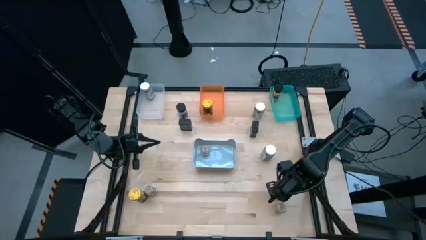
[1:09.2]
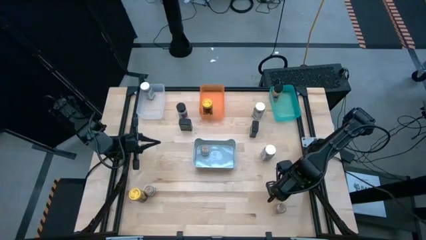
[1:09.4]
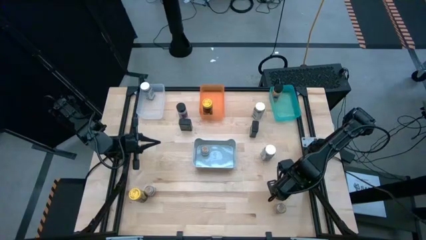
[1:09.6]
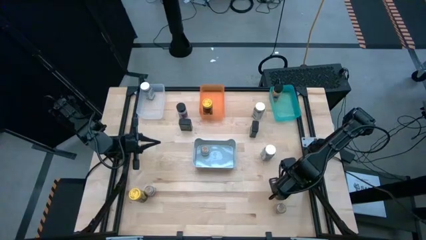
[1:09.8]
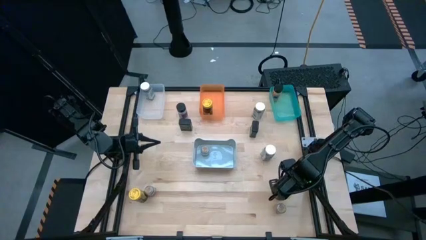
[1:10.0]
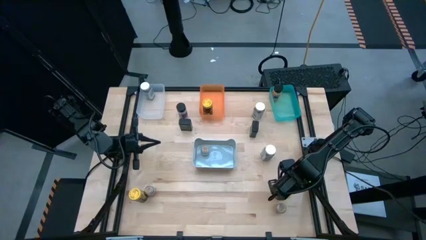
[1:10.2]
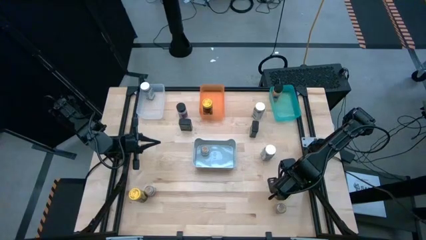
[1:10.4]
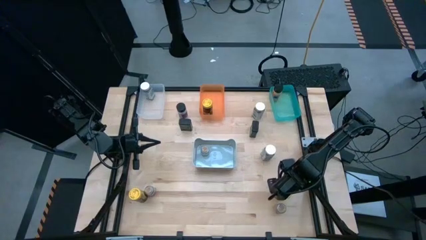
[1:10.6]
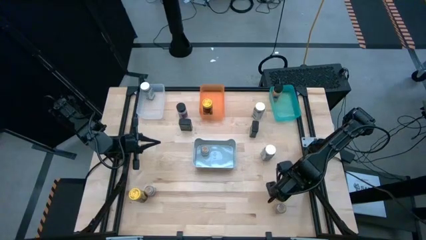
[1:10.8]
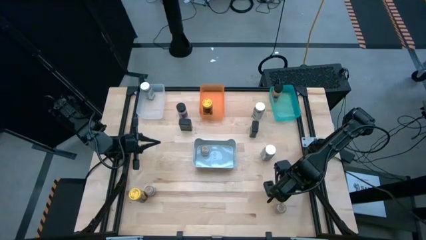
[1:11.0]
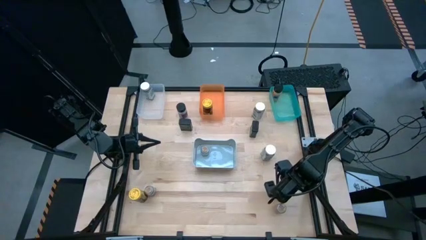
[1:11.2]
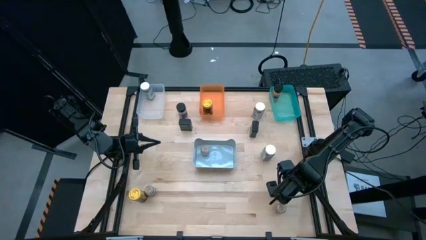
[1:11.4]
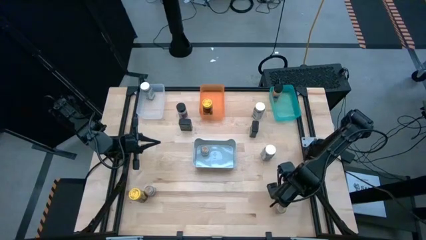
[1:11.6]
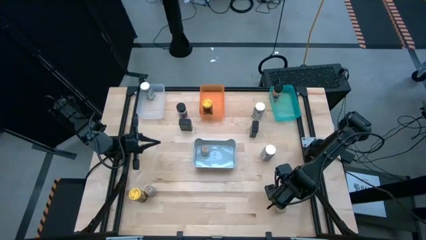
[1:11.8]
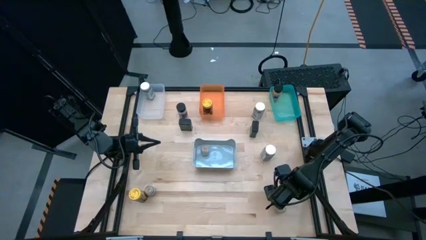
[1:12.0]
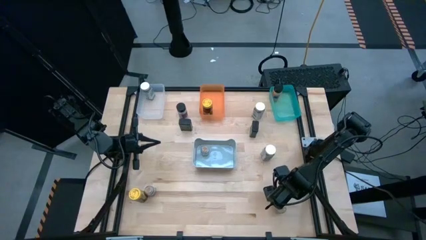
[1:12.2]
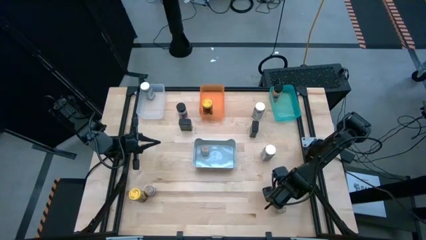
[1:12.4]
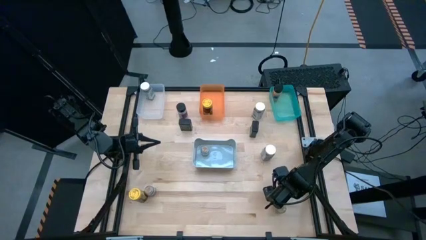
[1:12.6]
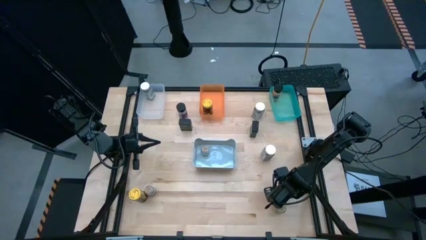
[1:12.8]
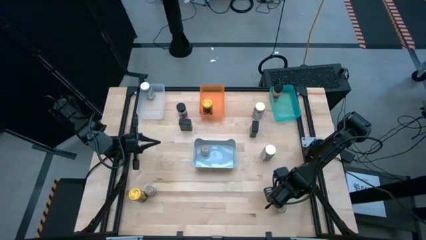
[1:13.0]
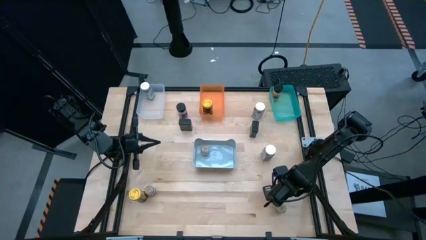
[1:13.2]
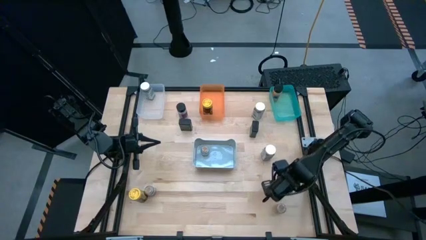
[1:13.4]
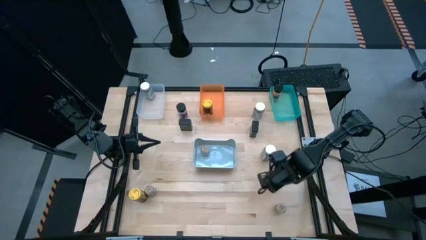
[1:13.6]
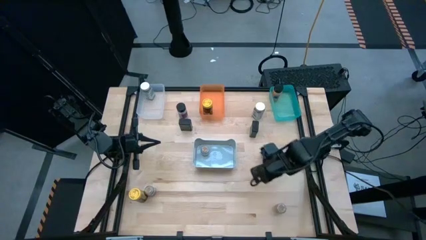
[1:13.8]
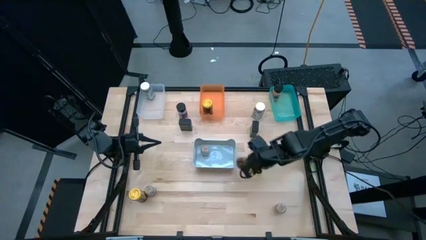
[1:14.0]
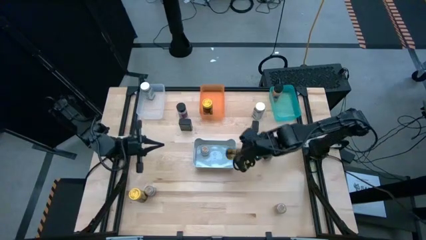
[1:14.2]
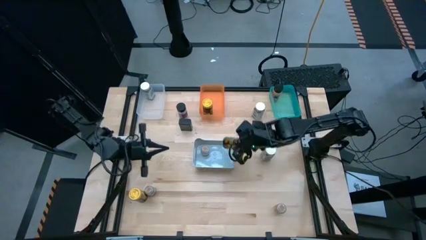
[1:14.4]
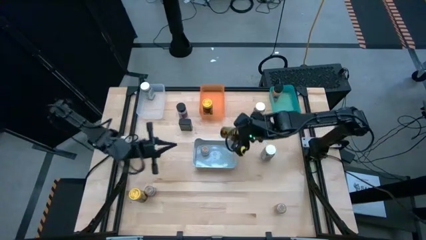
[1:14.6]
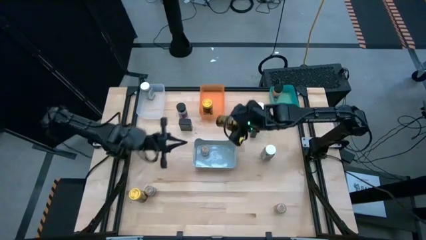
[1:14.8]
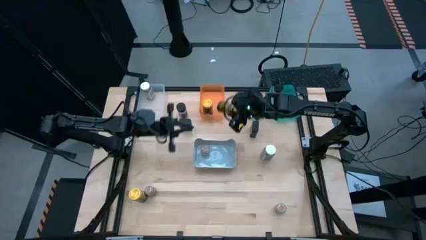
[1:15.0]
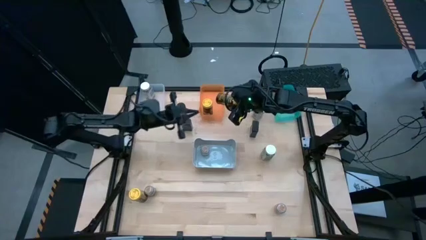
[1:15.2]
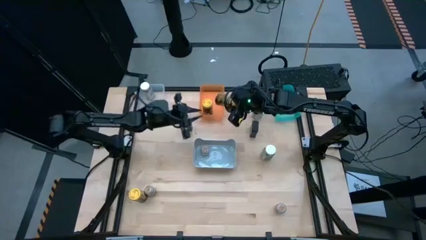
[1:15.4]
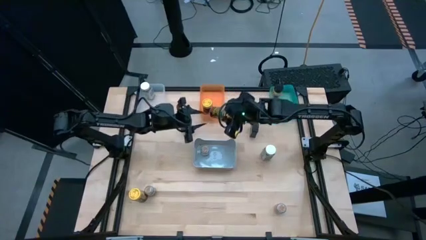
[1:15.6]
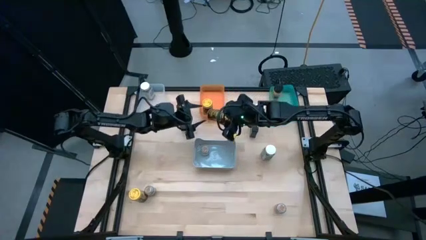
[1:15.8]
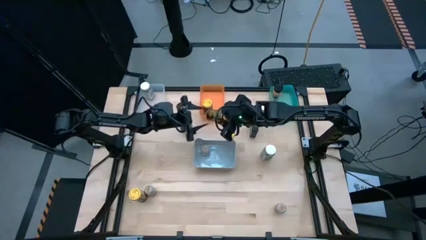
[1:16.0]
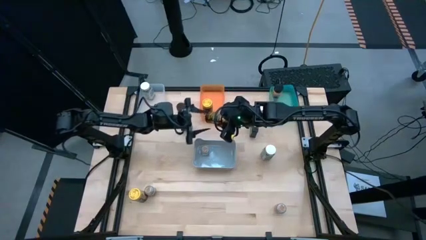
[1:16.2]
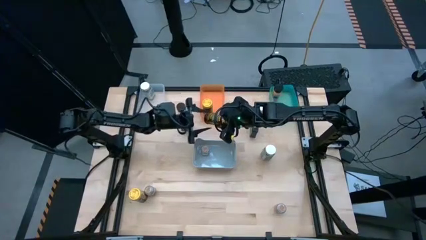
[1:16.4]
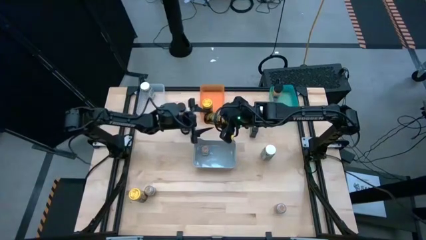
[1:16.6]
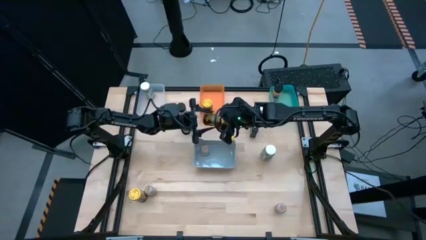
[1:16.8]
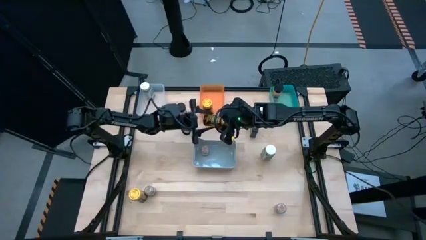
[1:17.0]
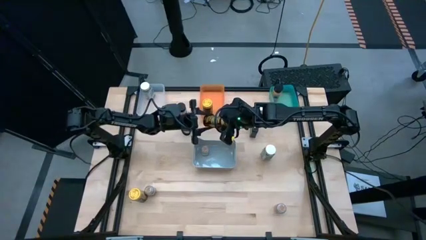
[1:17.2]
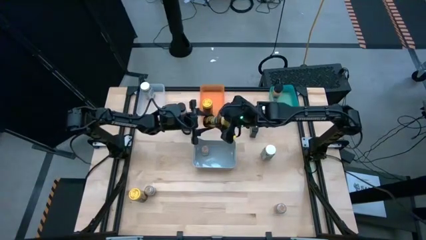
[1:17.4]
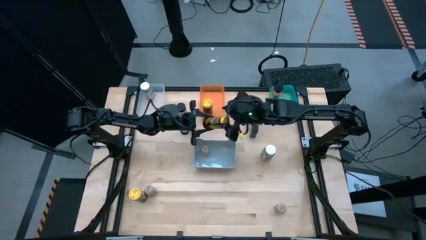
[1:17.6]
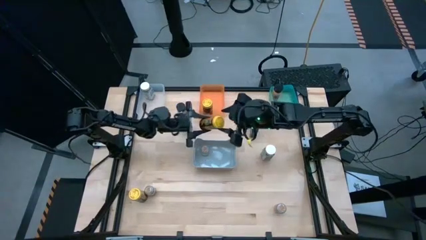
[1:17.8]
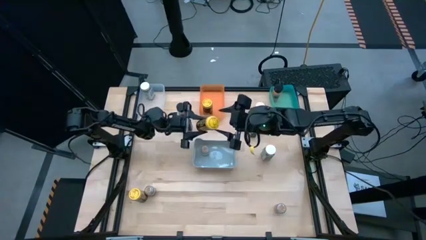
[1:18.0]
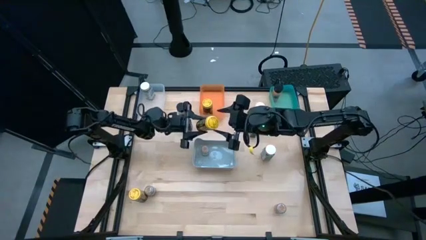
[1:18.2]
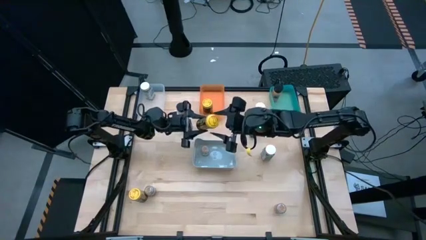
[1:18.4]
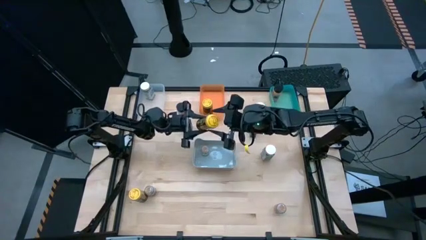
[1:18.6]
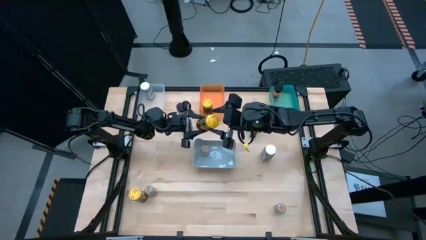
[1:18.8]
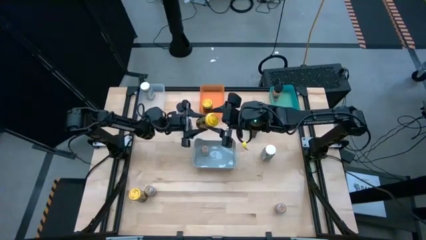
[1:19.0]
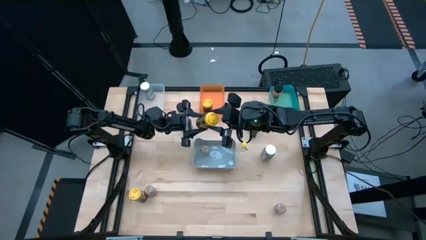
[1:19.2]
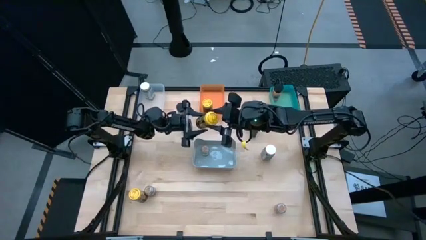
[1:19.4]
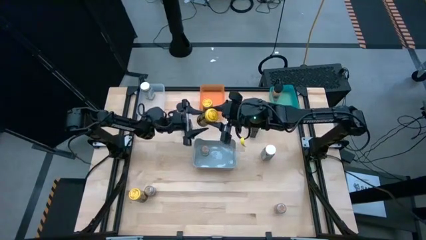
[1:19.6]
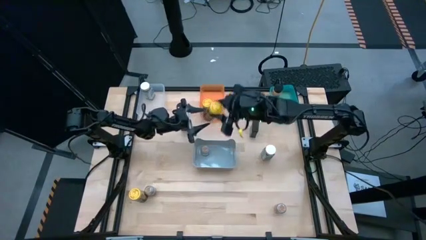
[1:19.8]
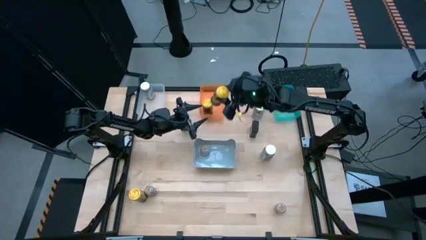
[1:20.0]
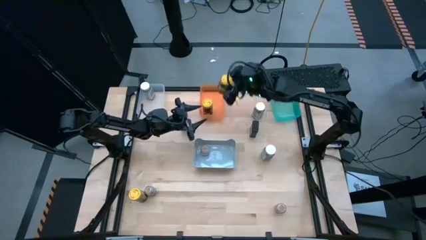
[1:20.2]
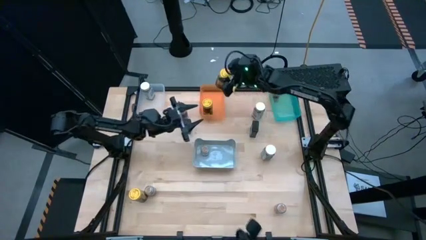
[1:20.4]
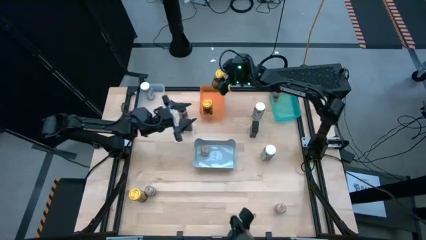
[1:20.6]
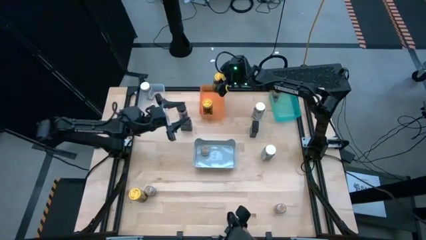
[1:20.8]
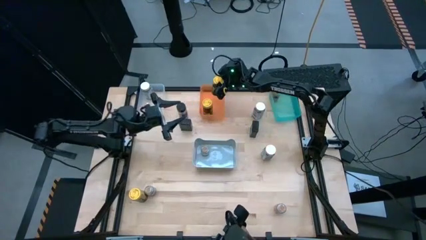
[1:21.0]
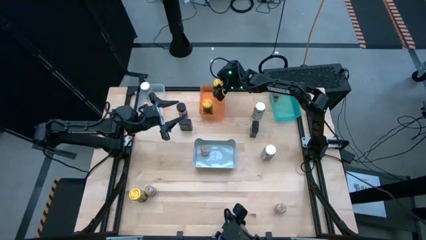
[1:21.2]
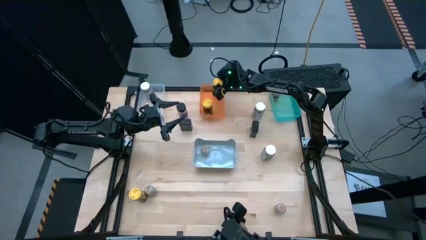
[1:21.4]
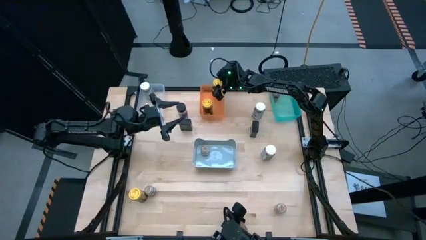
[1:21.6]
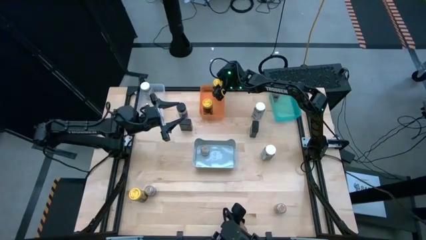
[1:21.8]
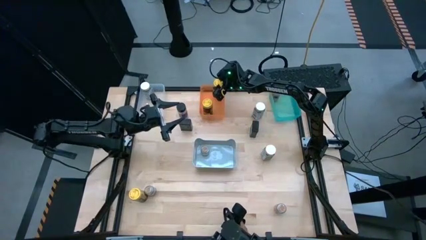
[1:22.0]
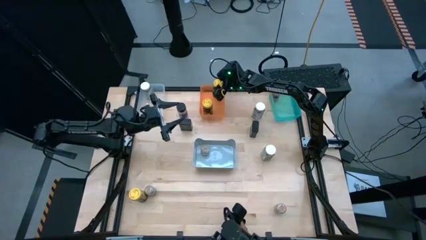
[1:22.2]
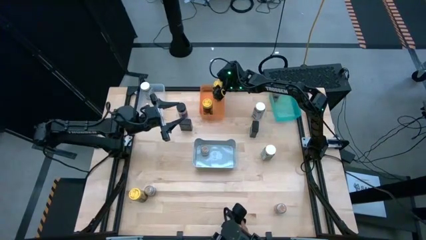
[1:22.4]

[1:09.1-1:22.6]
Task: Sort spices by type
Put the right yellow seasoning bottle into the orange bin
